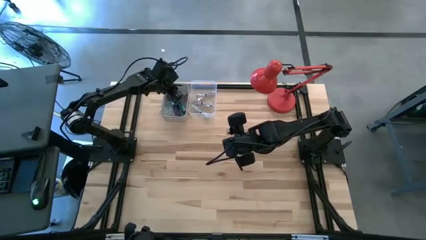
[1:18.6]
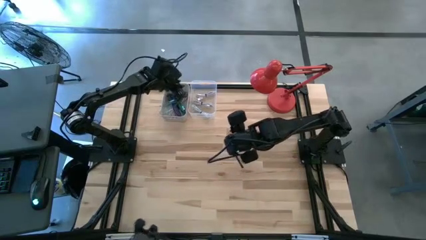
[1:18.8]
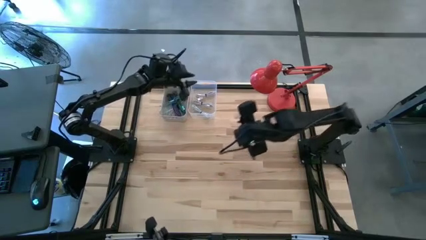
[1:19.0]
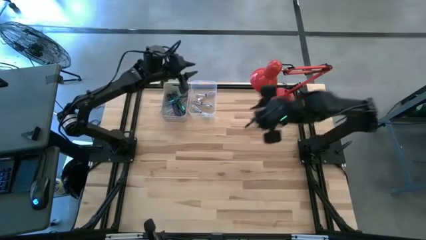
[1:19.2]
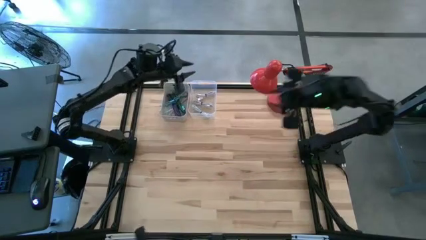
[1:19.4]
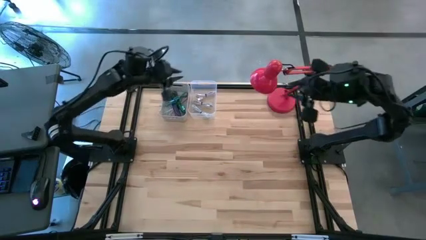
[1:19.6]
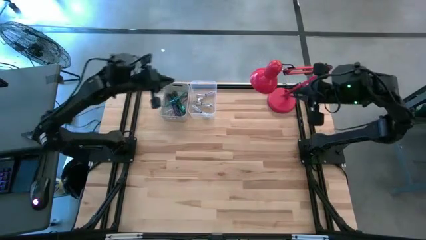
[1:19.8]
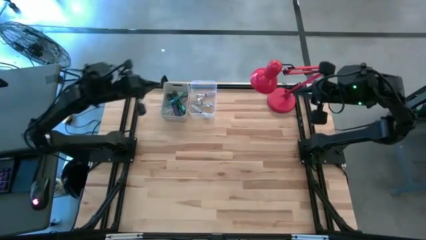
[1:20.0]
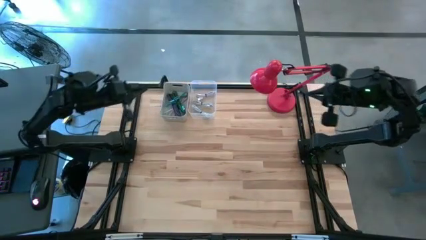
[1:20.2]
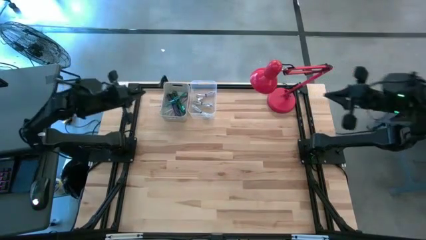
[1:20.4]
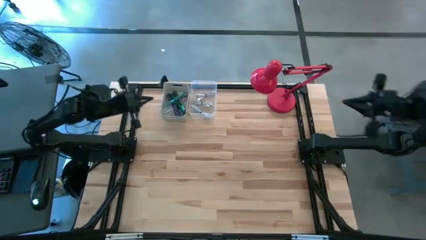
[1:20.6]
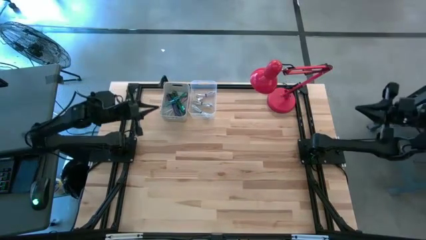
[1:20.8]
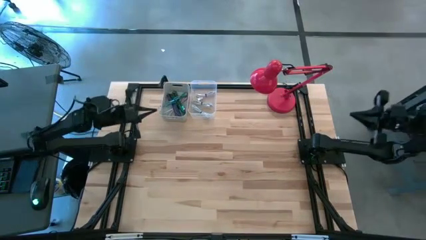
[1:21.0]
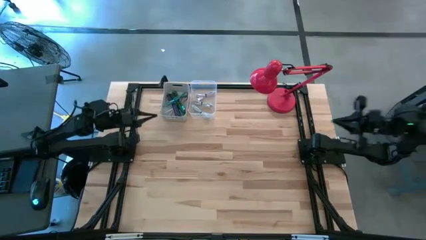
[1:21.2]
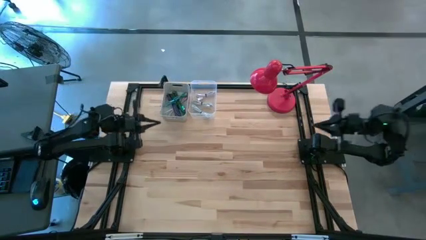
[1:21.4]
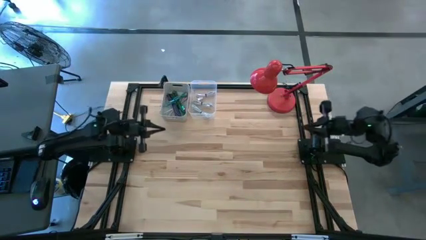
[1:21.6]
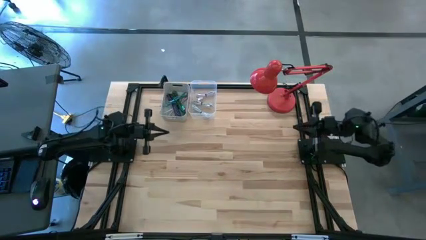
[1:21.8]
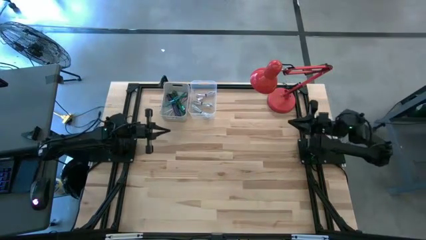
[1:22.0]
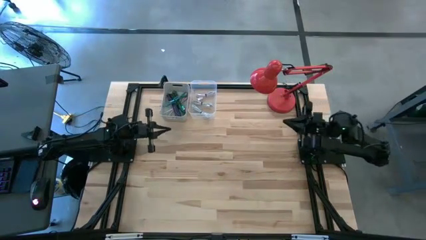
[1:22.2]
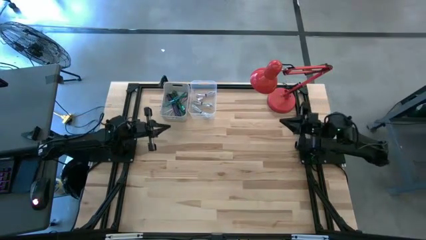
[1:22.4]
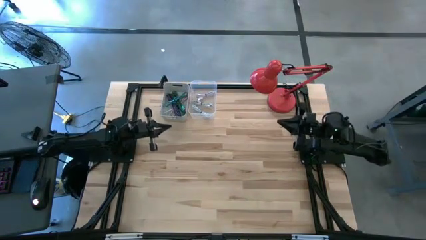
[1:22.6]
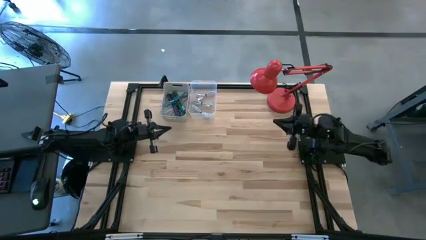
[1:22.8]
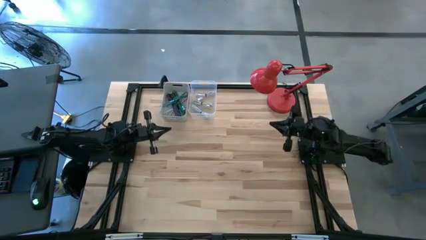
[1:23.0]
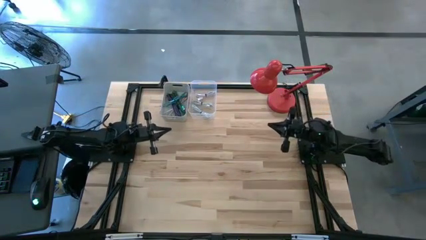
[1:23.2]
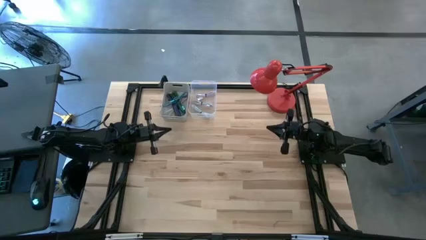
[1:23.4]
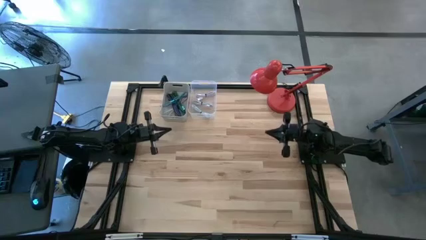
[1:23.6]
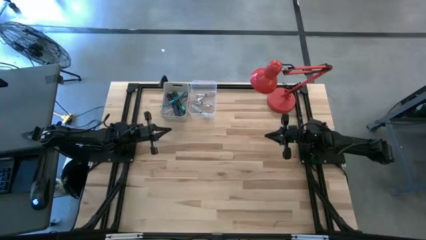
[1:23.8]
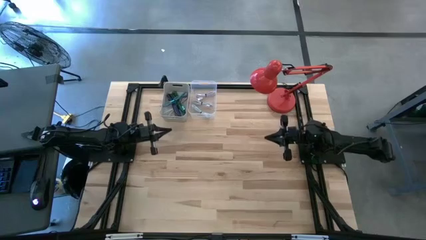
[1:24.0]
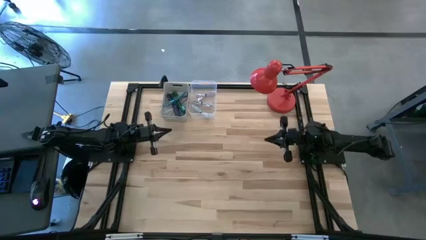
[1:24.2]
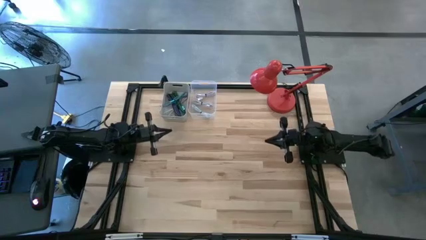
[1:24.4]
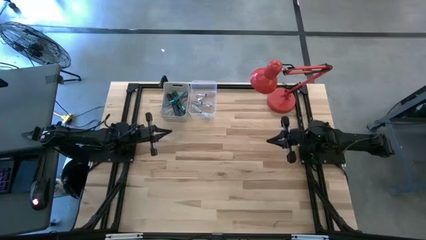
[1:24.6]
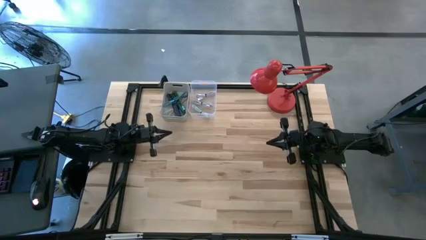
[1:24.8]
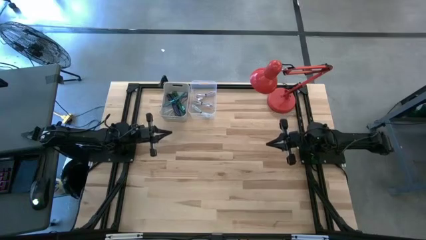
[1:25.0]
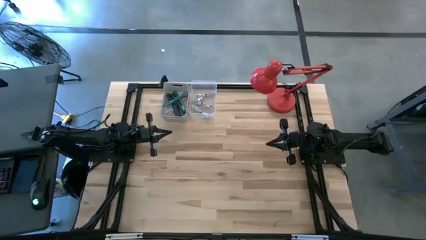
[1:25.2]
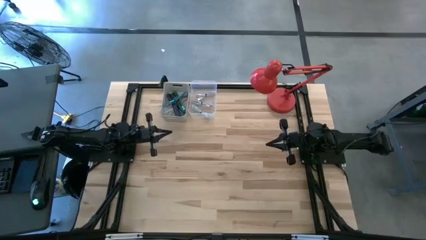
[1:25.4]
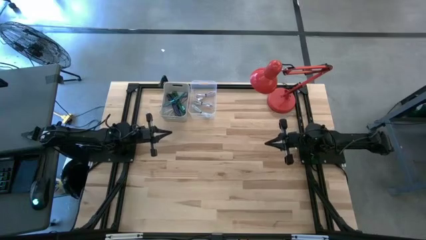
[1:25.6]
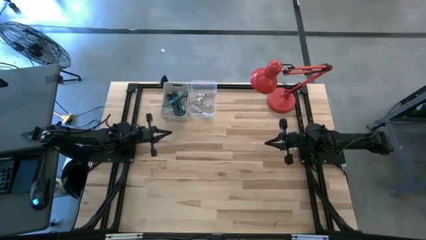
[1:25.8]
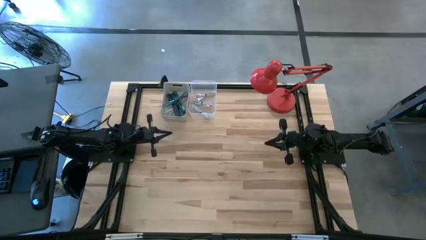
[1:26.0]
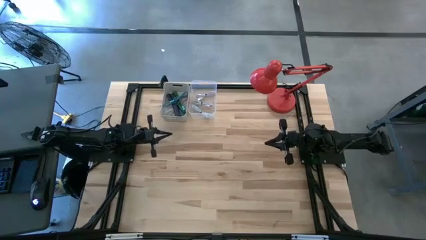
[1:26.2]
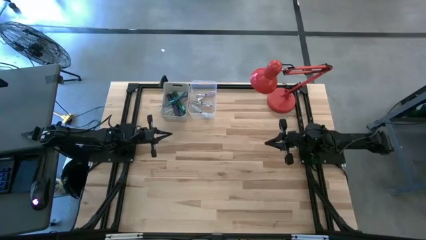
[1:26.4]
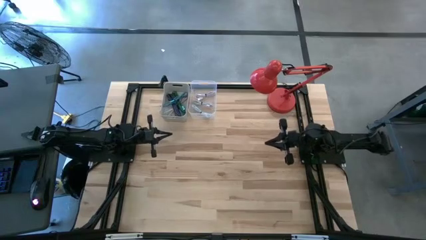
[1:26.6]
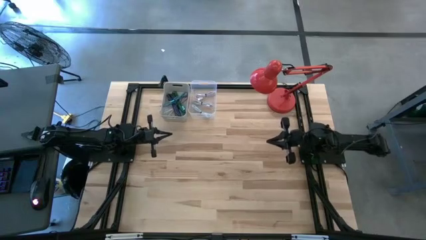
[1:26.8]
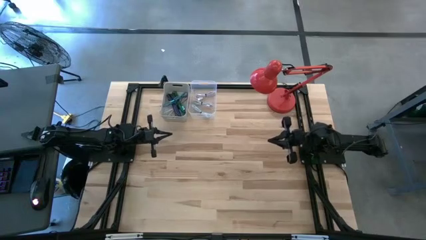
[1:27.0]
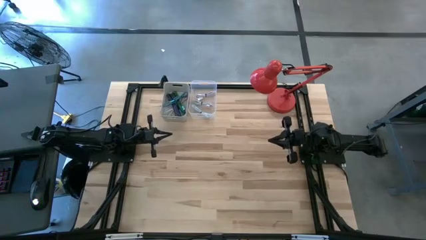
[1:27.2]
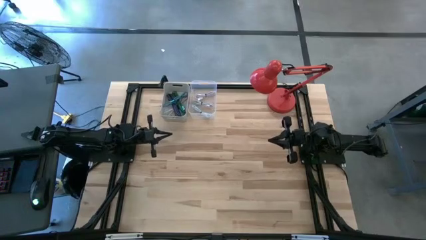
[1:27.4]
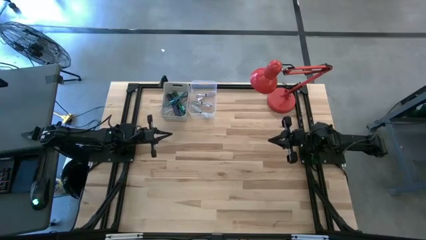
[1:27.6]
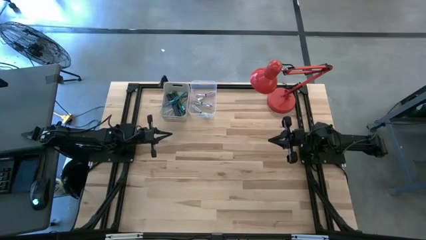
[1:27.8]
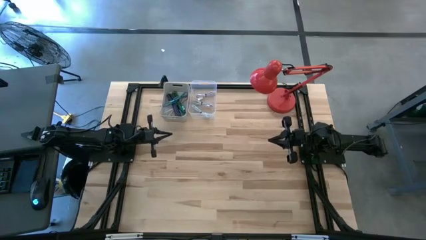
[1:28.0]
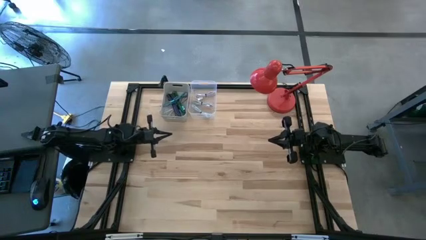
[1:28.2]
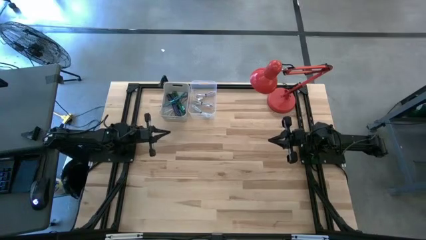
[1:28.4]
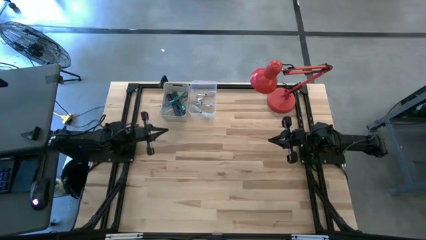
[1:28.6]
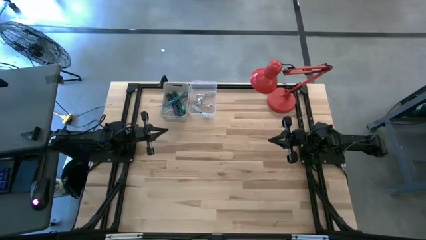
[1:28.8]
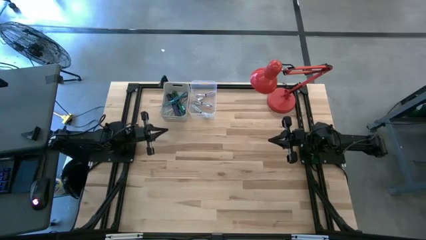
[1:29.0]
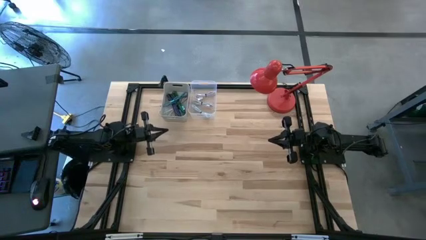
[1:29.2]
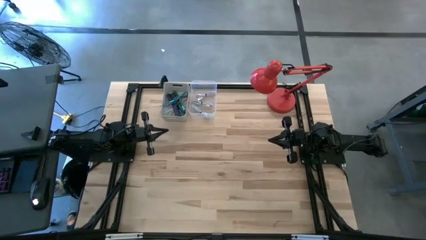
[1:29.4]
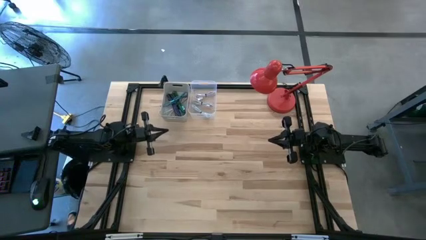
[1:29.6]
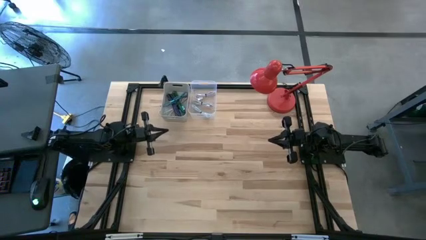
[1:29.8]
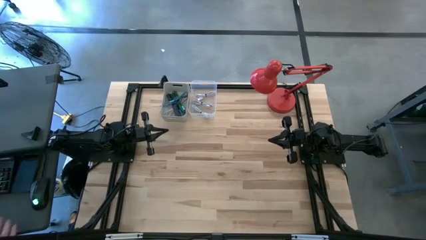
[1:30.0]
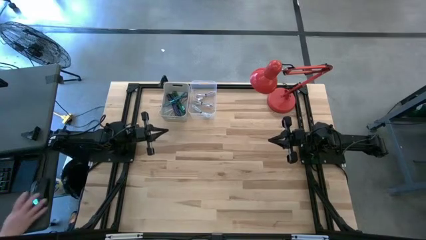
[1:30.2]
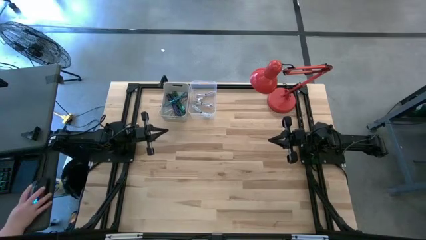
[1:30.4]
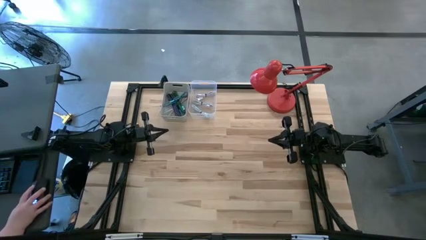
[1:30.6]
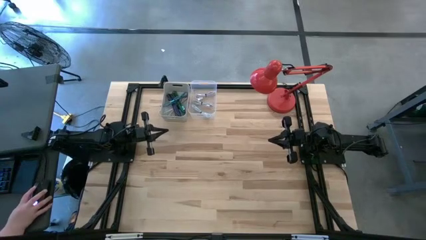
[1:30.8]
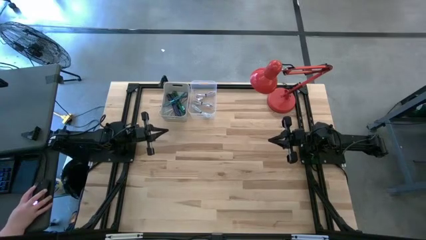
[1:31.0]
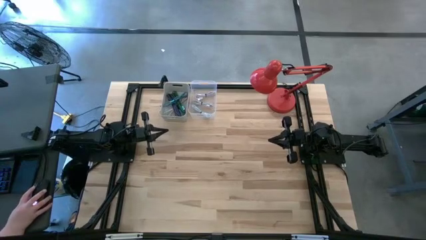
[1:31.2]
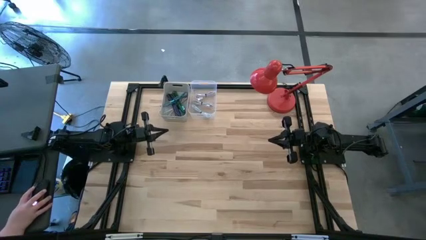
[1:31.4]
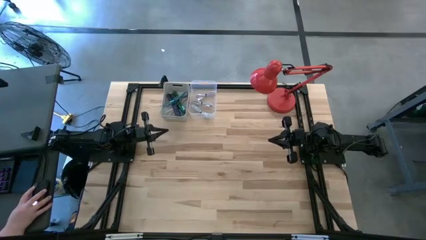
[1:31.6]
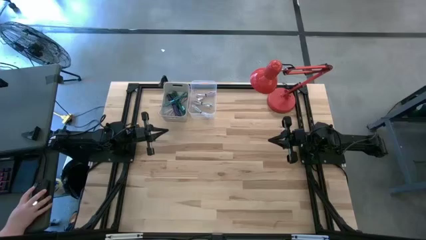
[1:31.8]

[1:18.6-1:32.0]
Task: Pick & Place USB Port
Return to Home Position

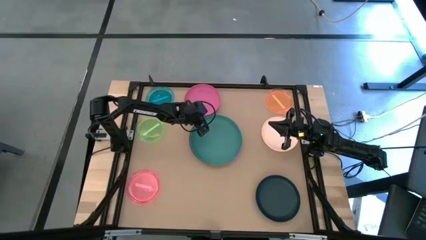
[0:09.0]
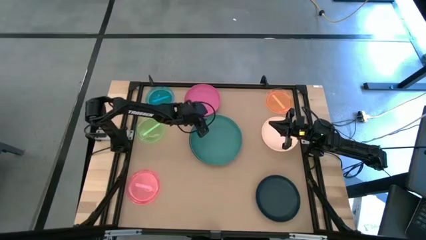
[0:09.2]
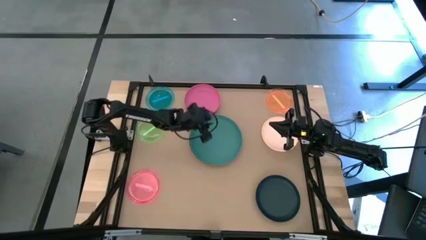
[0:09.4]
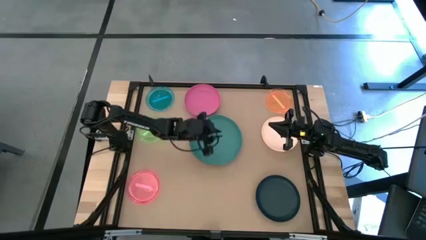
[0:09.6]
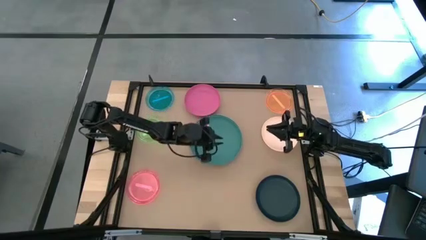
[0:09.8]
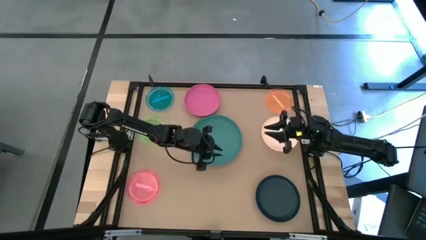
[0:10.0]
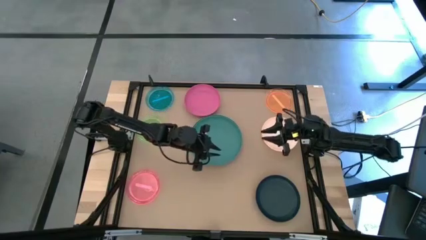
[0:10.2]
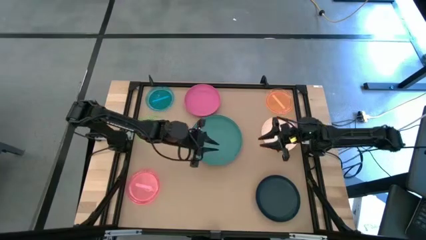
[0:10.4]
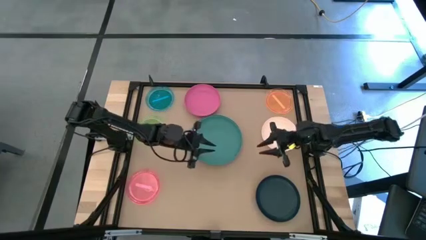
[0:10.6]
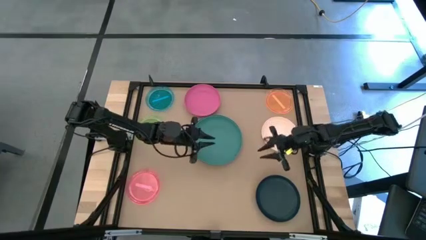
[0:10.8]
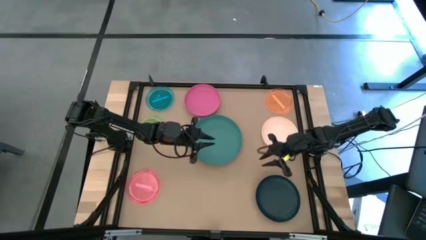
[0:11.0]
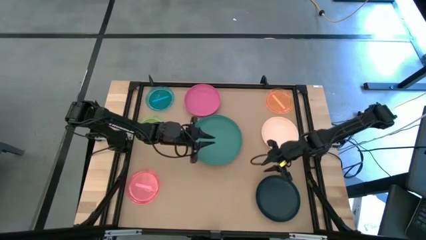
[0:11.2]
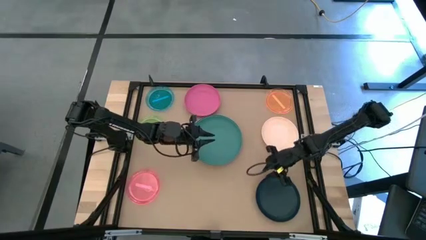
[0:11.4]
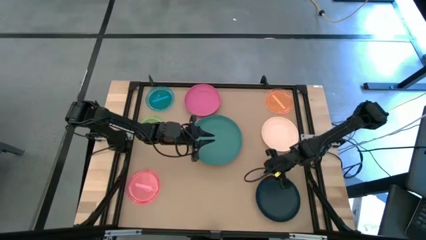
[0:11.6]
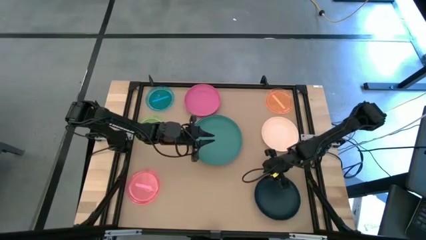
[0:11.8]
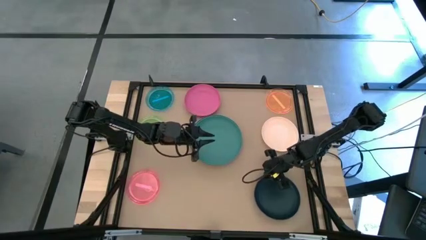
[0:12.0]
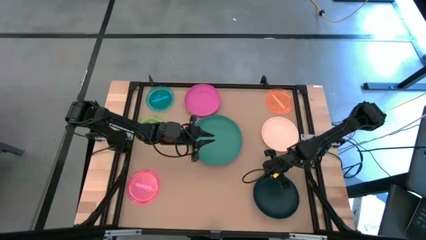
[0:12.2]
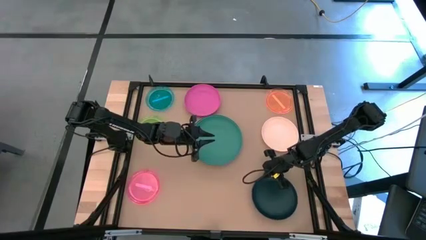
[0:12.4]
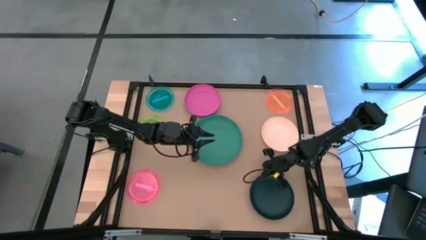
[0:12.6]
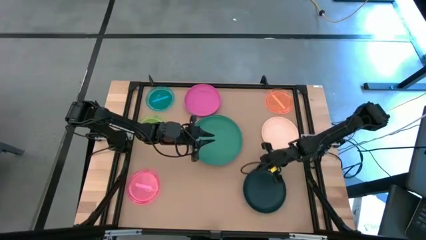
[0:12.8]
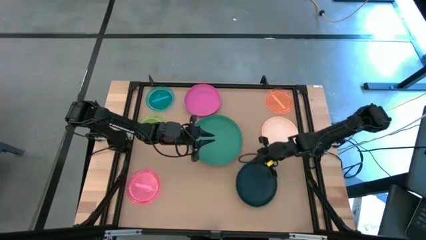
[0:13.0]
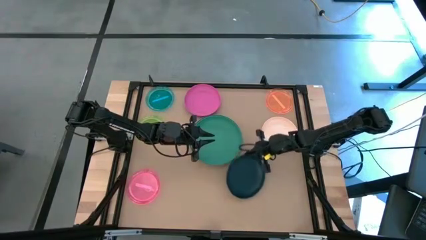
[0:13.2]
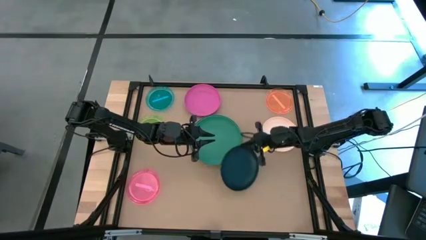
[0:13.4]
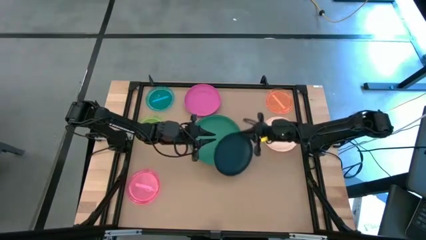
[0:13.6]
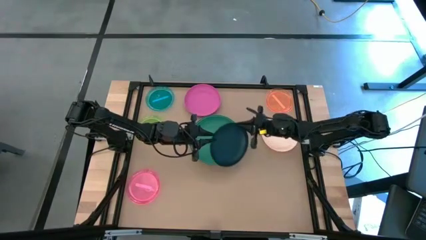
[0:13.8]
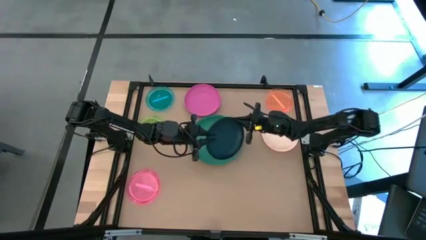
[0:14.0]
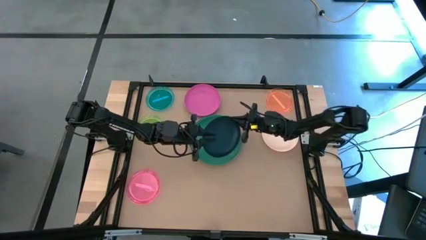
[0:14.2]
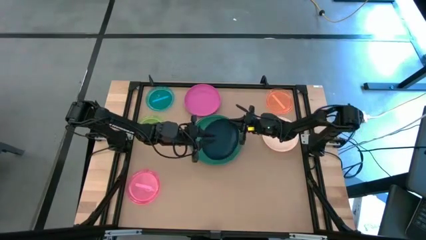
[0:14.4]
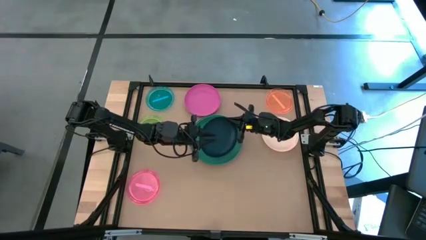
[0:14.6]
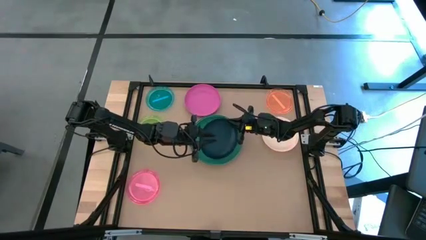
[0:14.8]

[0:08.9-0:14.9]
Task: Stack plastic plates
Stack the dark blue plate on the green plate
